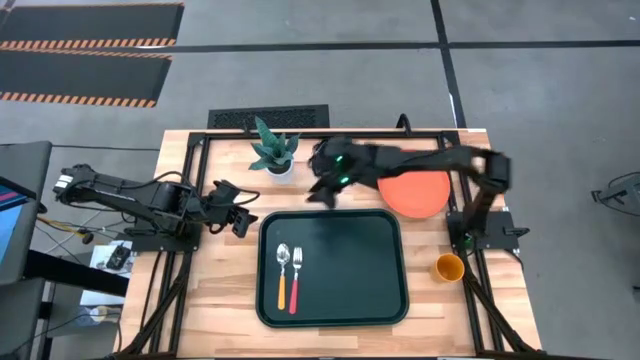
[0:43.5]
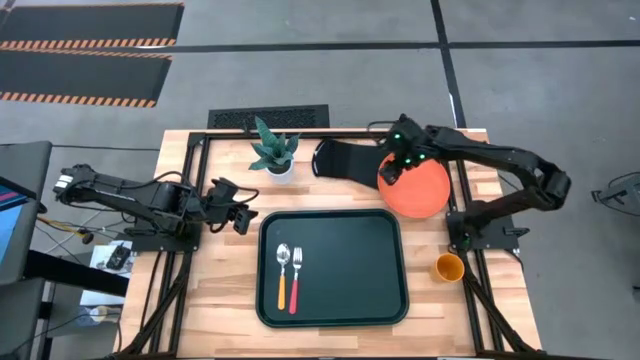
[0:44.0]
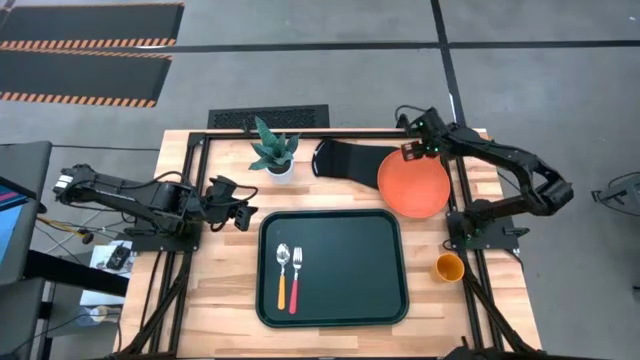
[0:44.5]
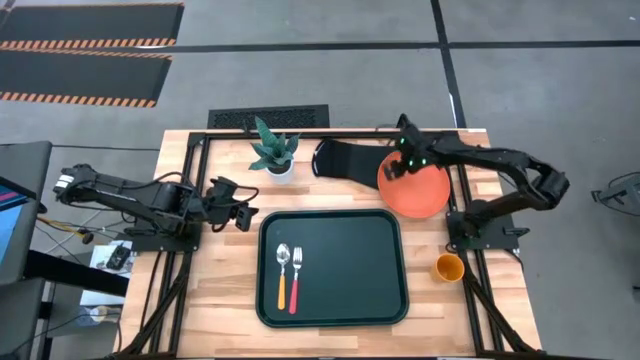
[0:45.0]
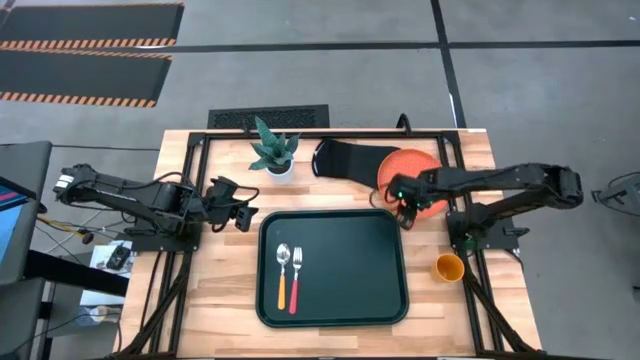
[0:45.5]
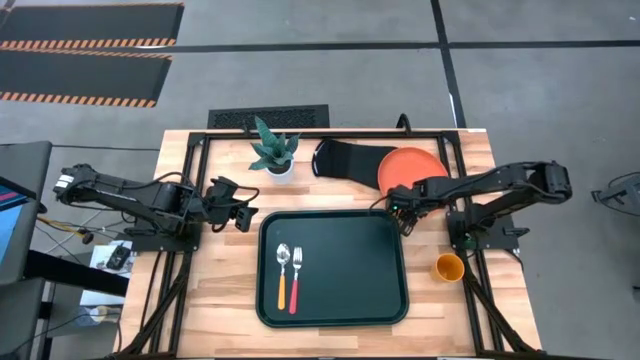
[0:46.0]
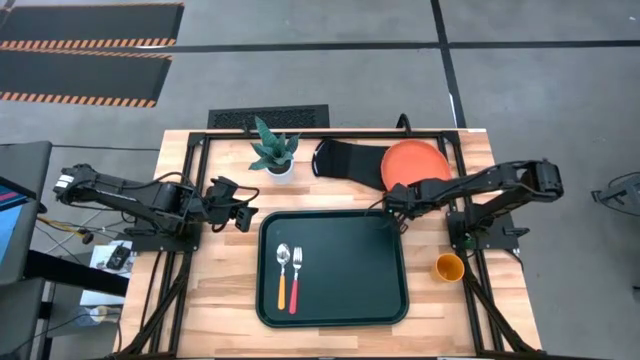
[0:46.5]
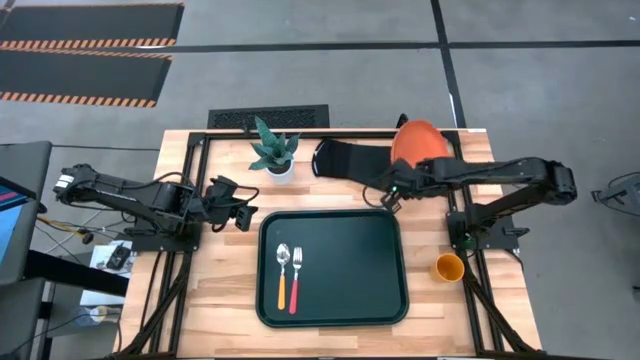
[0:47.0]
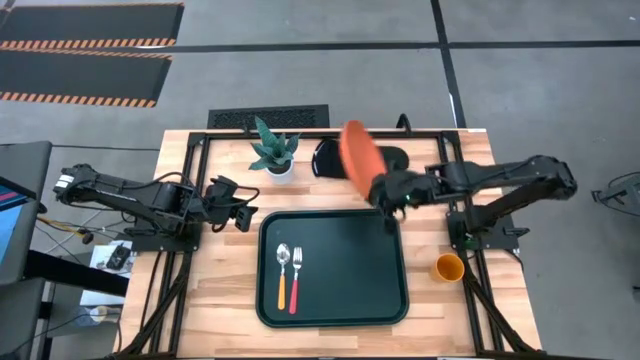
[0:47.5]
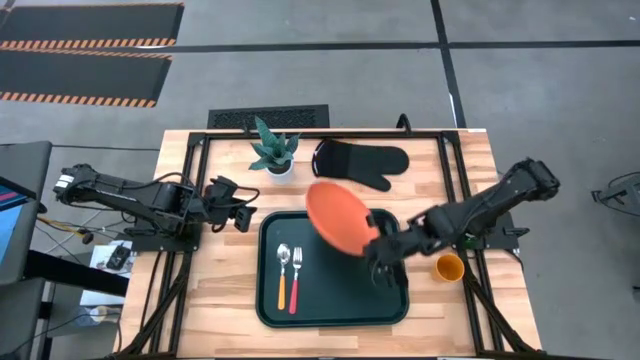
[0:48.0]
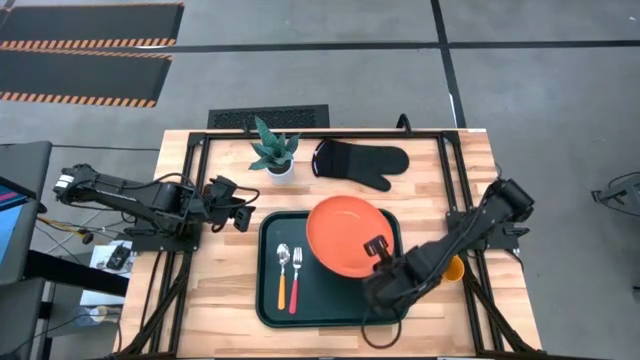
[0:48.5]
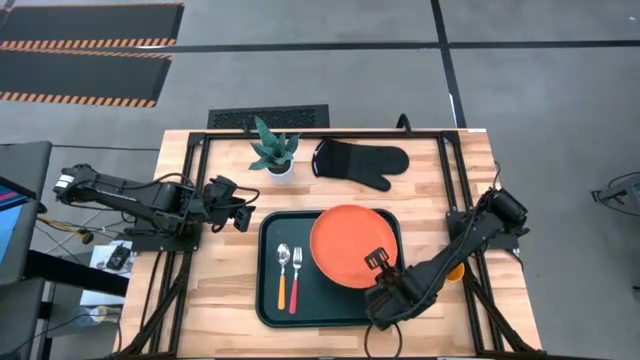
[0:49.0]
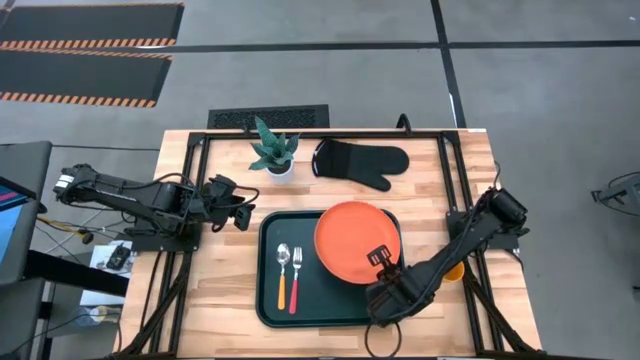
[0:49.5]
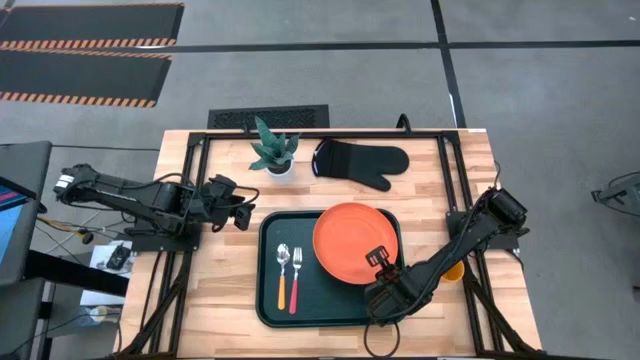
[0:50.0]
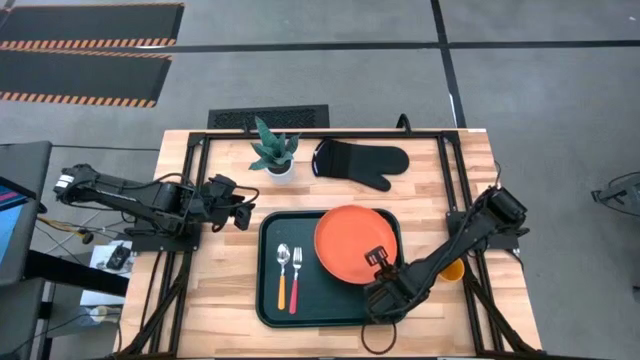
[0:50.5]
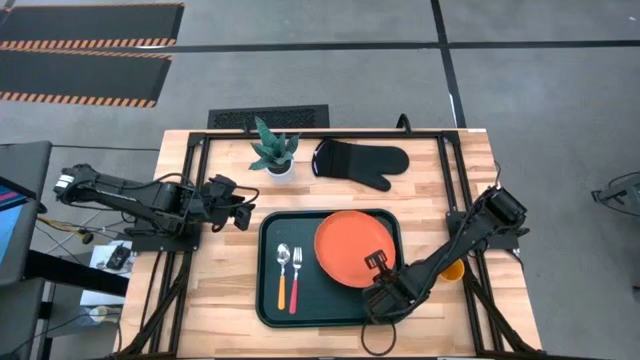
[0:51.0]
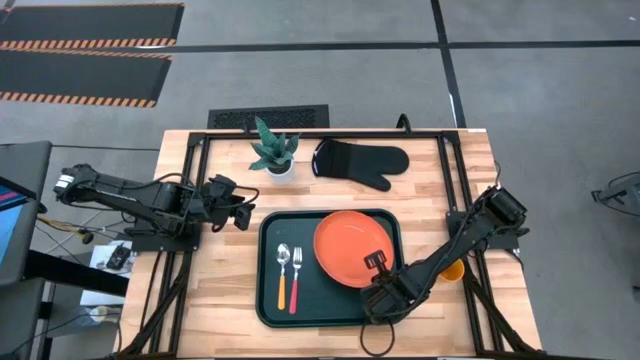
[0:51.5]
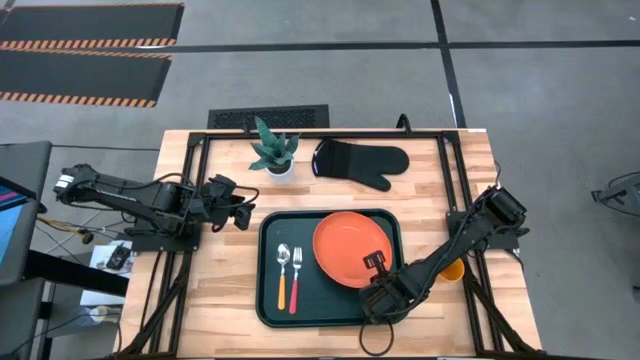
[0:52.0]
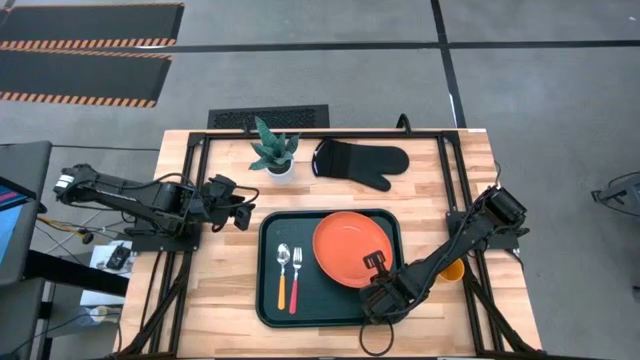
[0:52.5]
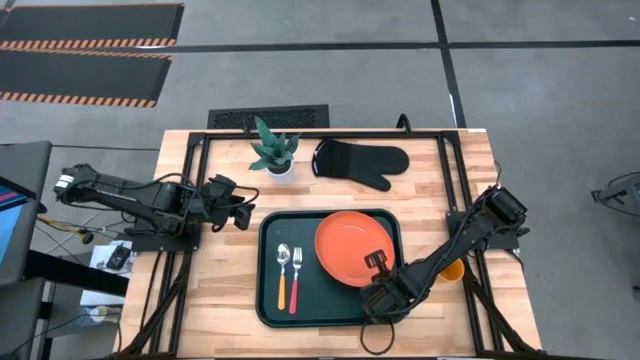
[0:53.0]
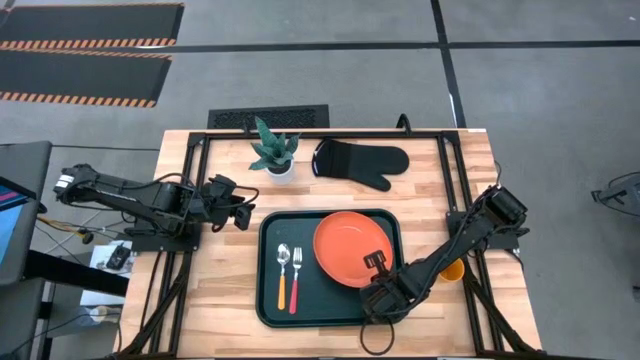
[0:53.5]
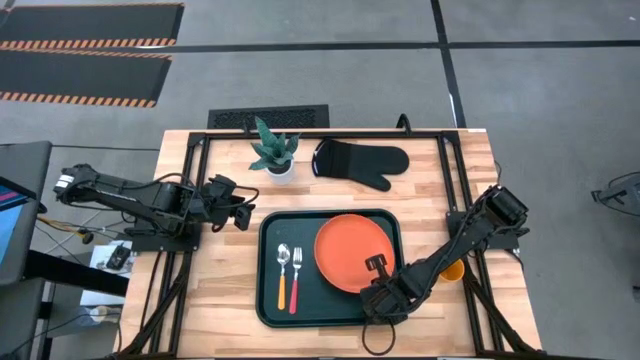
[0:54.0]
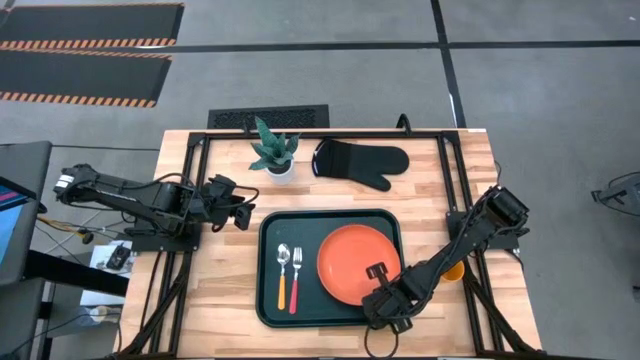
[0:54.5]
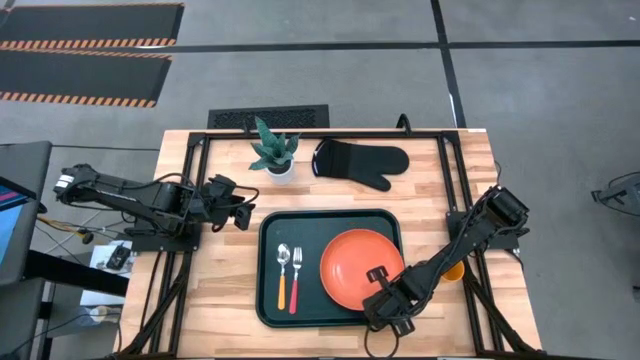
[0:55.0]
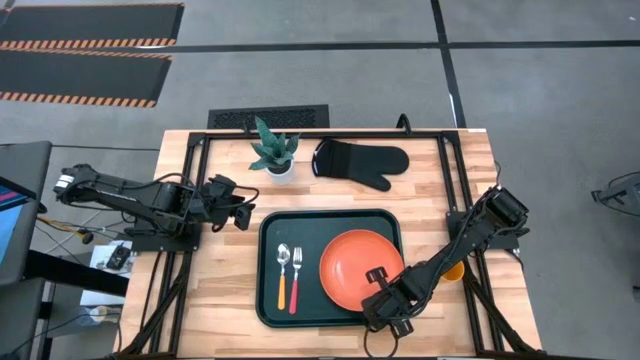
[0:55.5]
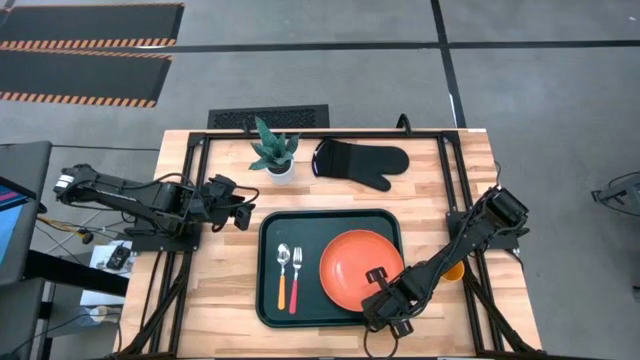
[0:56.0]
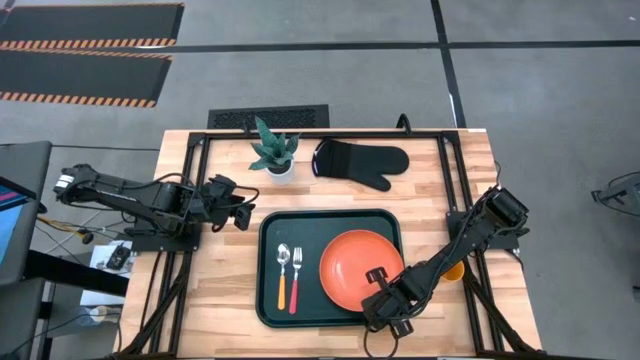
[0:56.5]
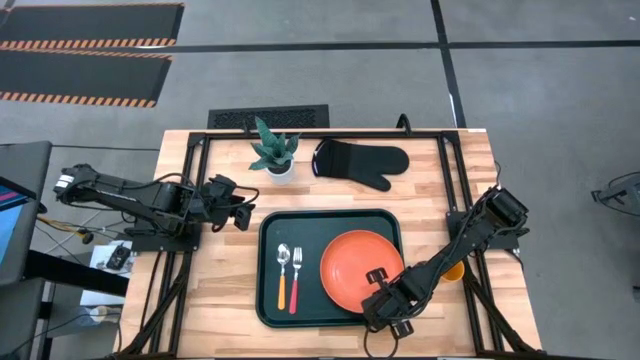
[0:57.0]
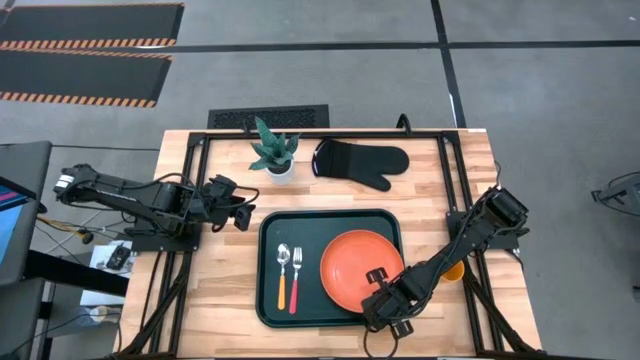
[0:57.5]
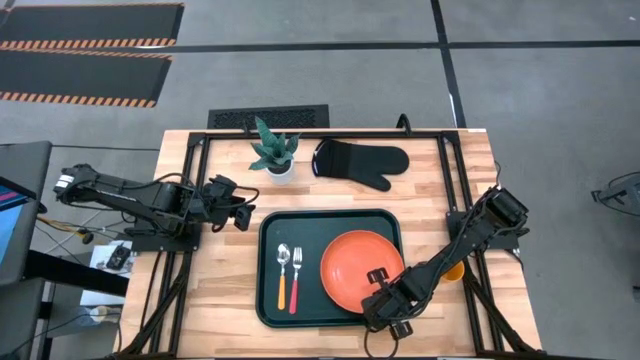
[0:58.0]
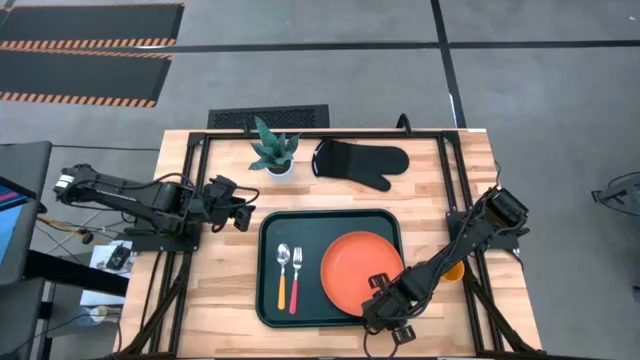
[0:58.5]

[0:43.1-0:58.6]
Task: Pick and place plate/cup/fork/spoon on tray
Put the orange plate on the black tray to the right side of the pink fork

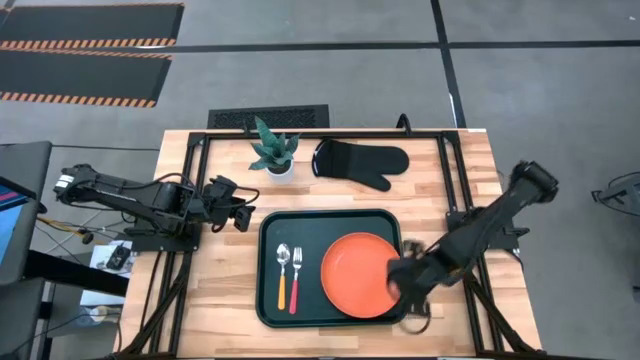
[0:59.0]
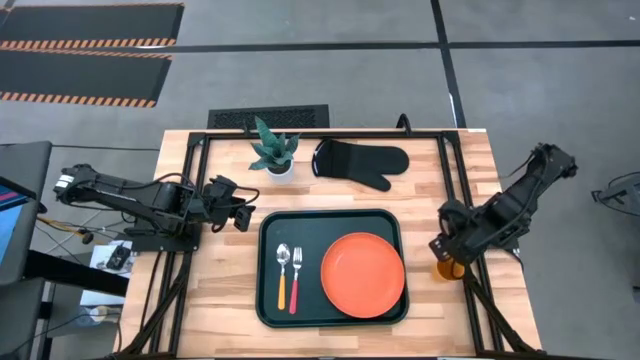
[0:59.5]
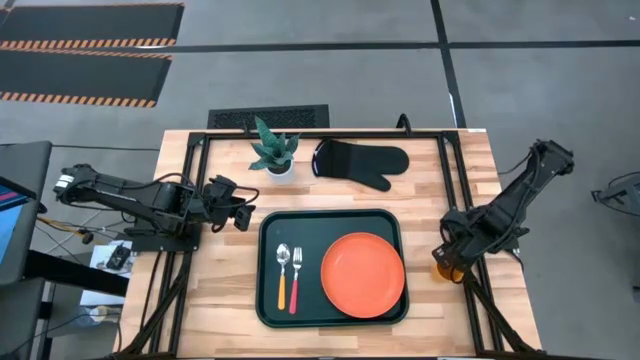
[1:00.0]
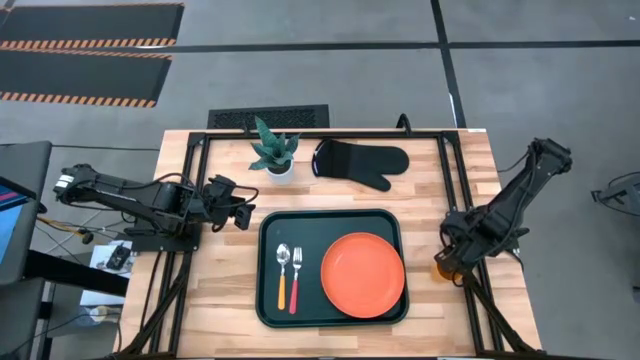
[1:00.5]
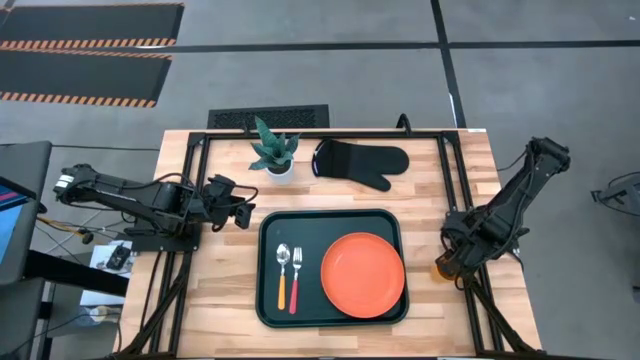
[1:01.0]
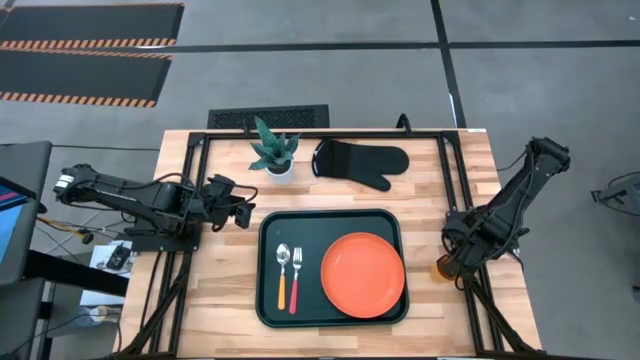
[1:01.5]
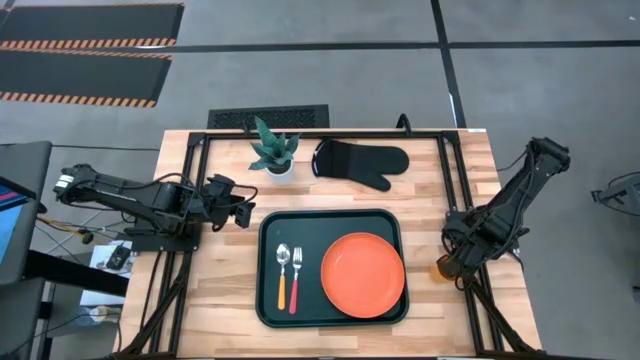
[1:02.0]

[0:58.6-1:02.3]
Put the yellow cup on the black tray at the top right of the orange plate

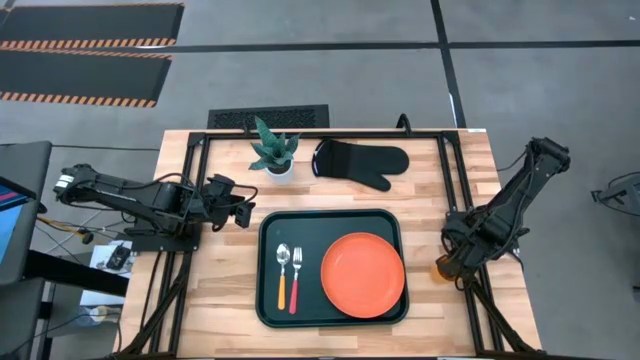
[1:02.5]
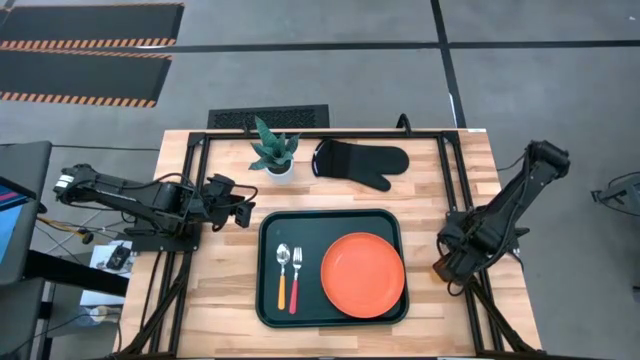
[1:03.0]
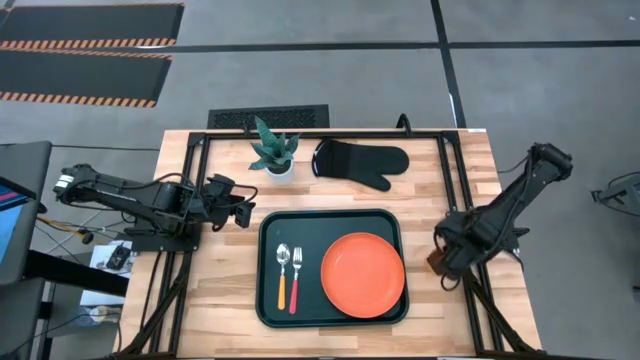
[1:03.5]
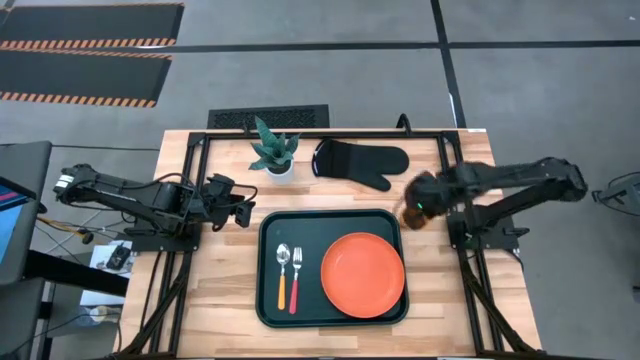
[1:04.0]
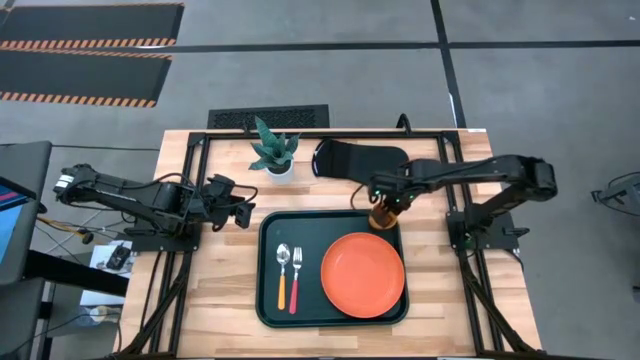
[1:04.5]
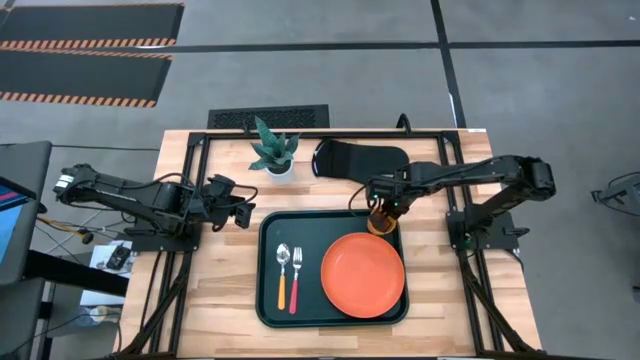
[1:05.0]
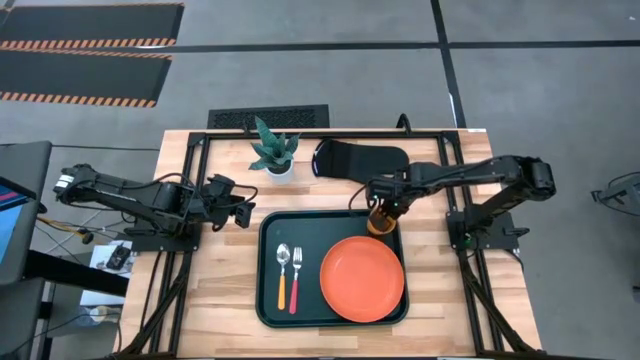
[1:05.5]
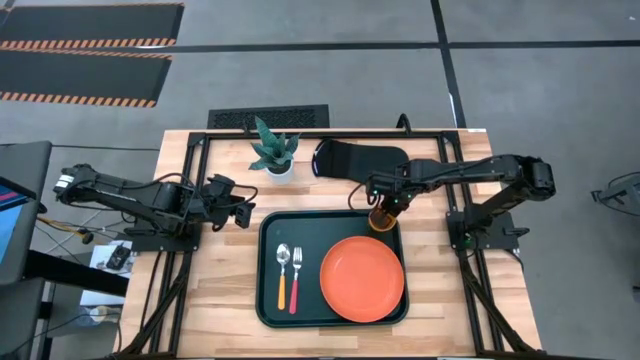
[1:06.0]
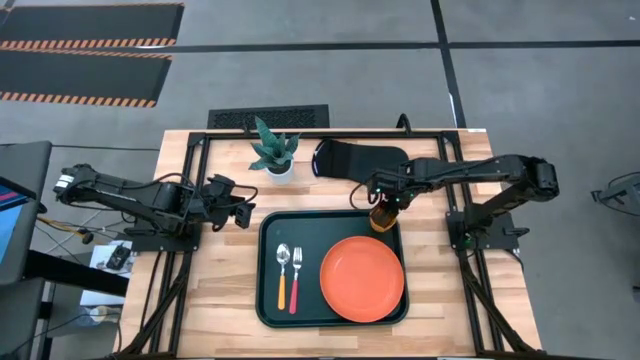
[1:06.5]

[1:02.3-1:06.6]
Put the yellow cup on the black tray at the top right of the orange plate
